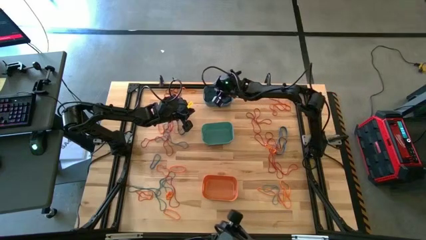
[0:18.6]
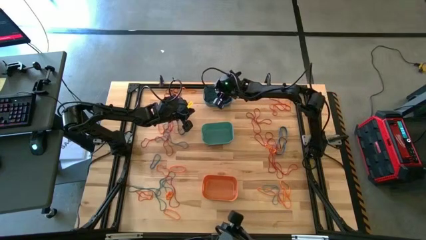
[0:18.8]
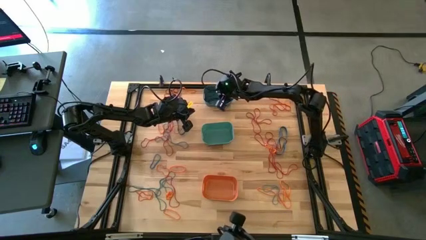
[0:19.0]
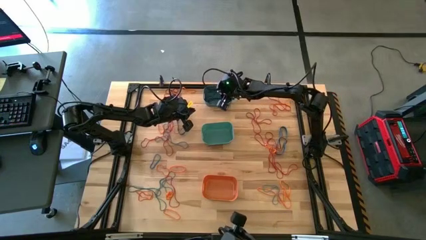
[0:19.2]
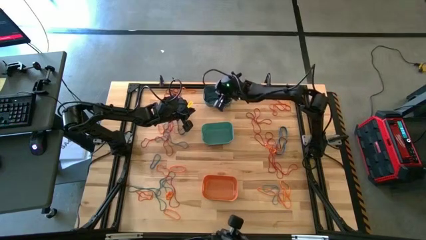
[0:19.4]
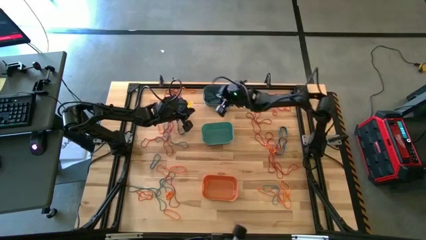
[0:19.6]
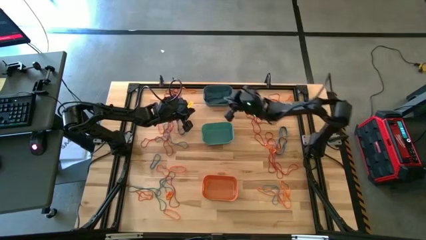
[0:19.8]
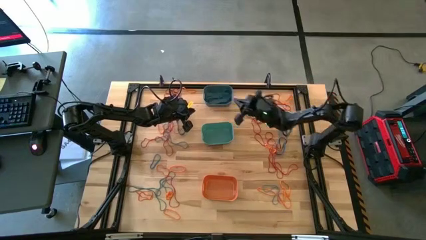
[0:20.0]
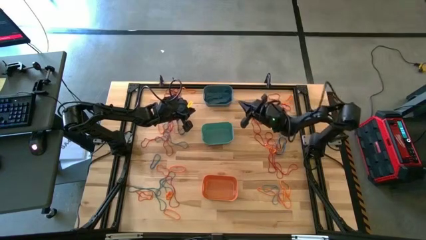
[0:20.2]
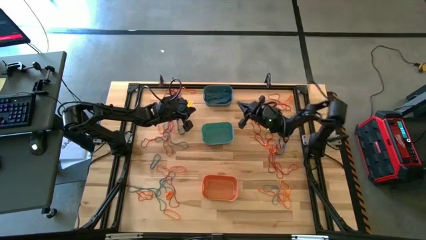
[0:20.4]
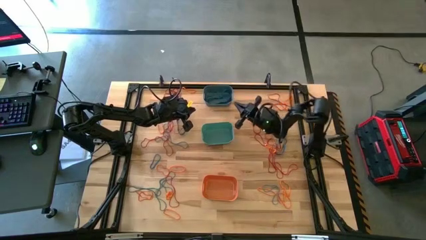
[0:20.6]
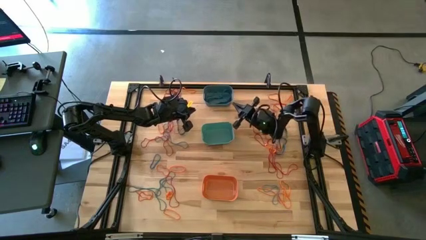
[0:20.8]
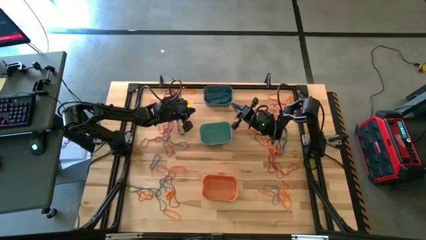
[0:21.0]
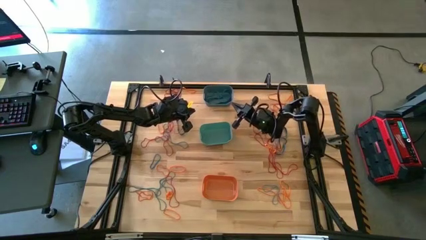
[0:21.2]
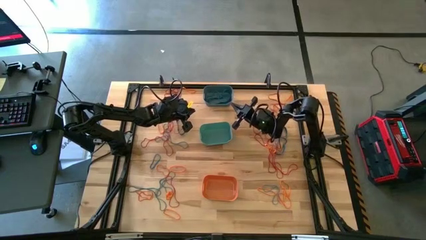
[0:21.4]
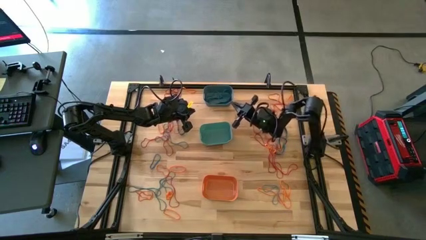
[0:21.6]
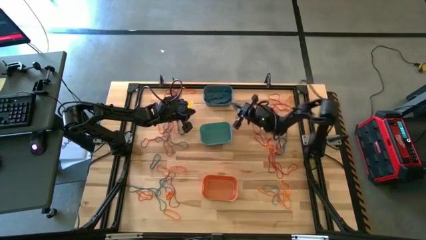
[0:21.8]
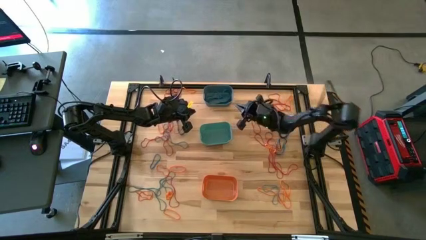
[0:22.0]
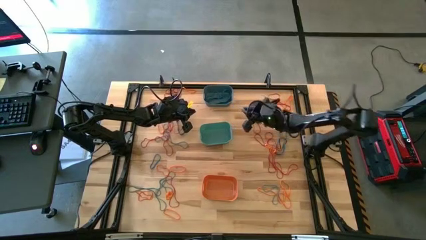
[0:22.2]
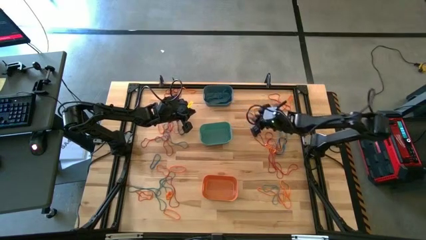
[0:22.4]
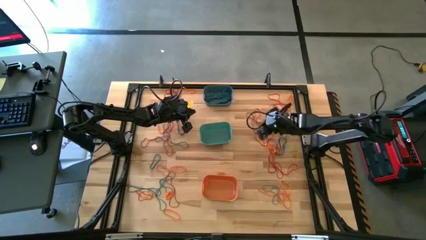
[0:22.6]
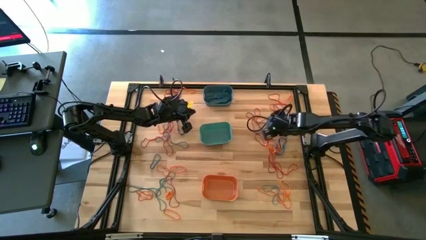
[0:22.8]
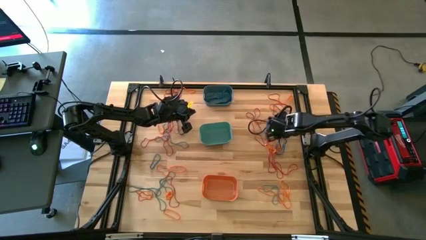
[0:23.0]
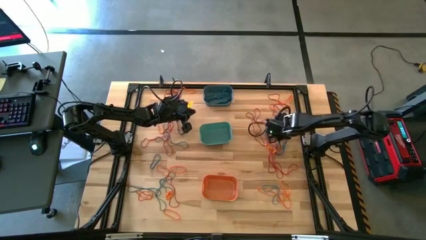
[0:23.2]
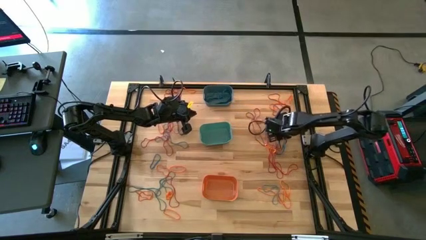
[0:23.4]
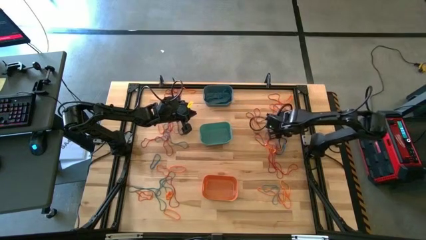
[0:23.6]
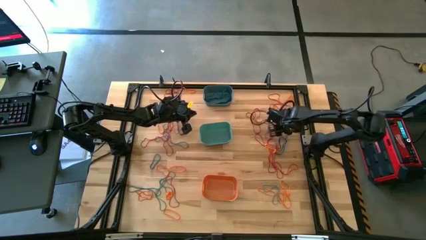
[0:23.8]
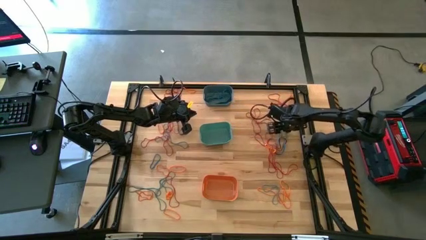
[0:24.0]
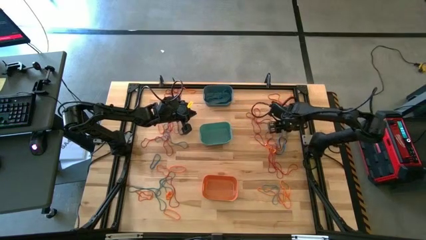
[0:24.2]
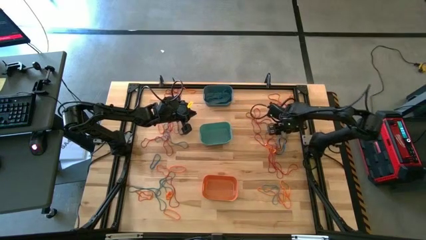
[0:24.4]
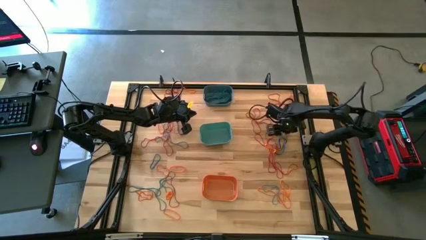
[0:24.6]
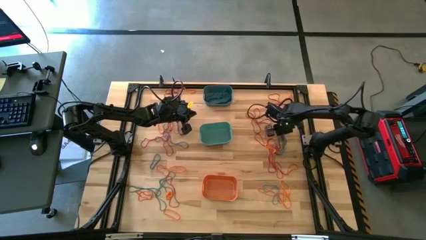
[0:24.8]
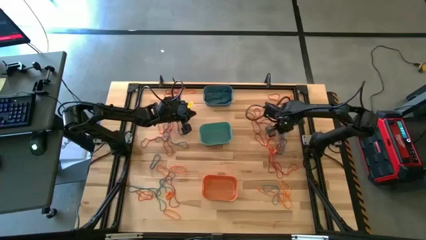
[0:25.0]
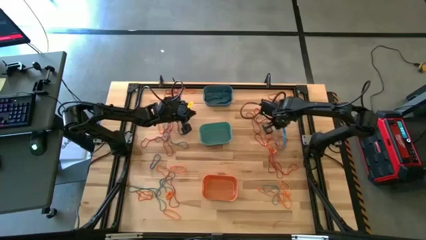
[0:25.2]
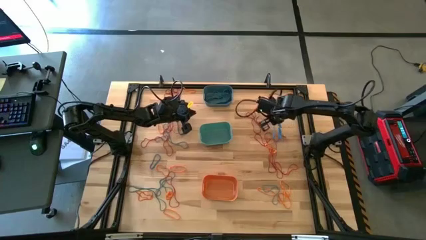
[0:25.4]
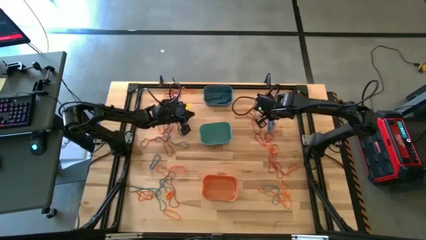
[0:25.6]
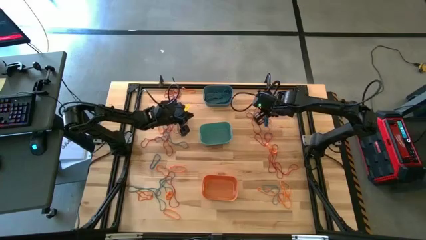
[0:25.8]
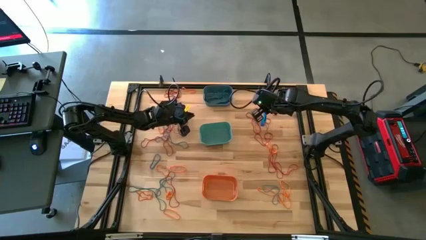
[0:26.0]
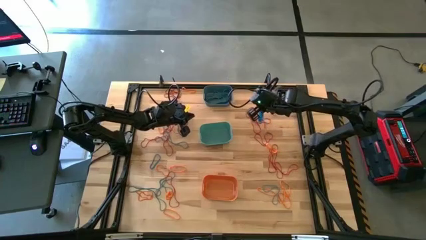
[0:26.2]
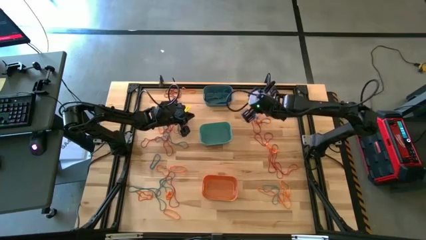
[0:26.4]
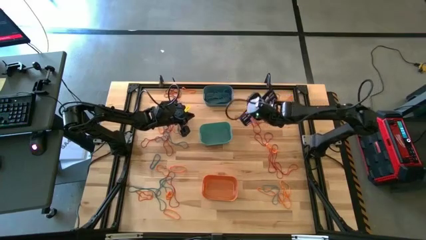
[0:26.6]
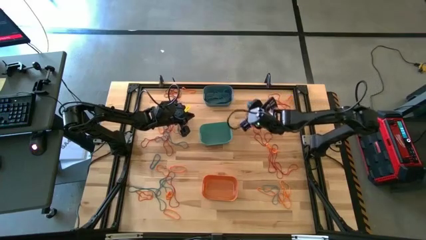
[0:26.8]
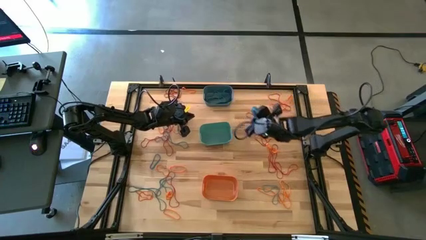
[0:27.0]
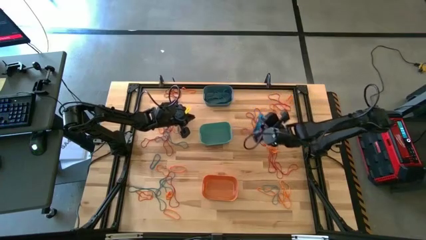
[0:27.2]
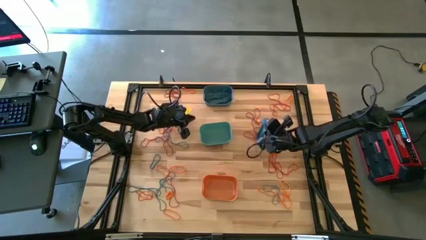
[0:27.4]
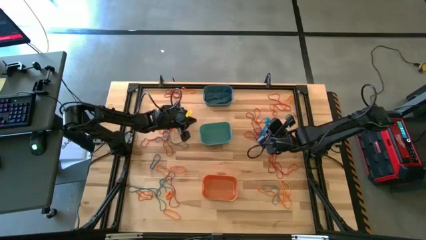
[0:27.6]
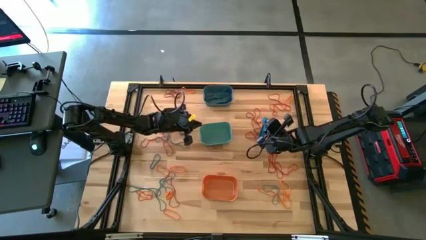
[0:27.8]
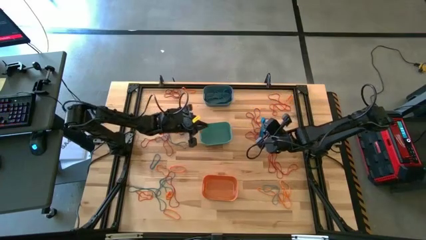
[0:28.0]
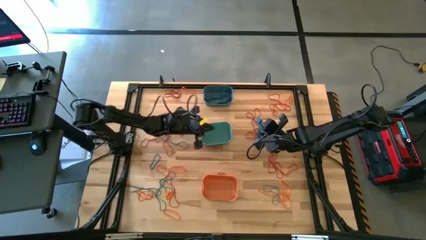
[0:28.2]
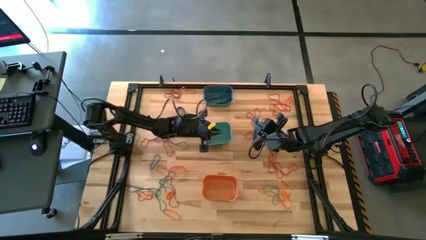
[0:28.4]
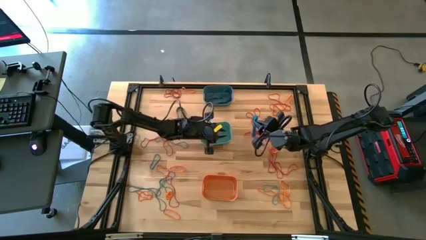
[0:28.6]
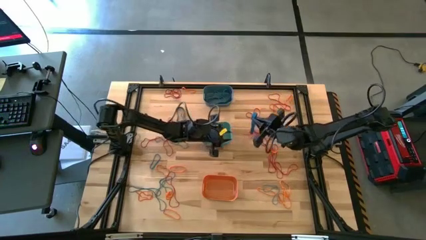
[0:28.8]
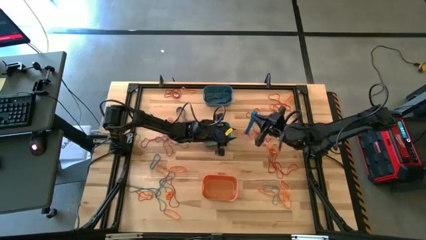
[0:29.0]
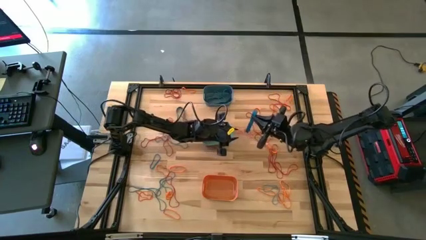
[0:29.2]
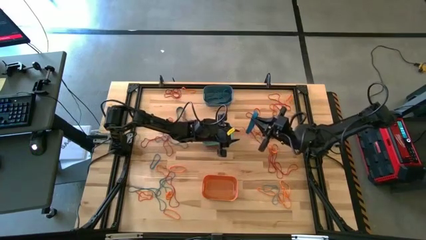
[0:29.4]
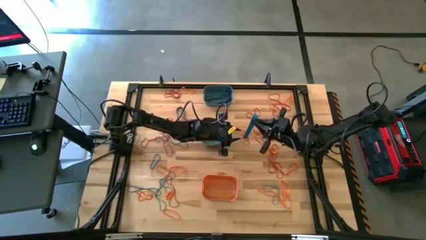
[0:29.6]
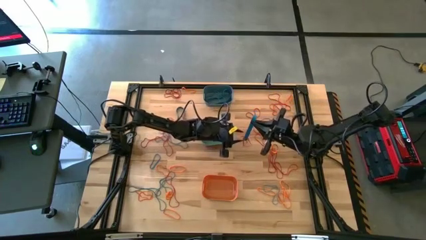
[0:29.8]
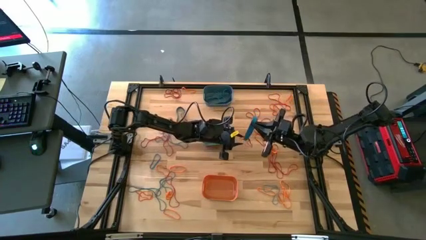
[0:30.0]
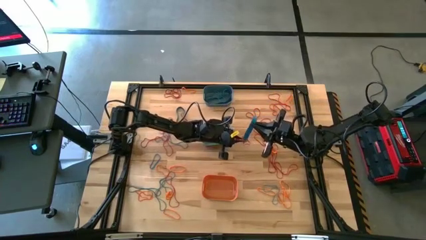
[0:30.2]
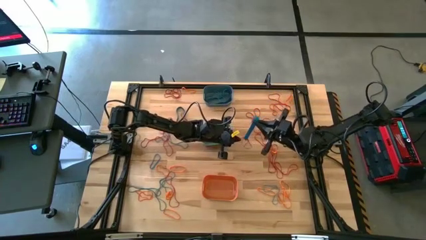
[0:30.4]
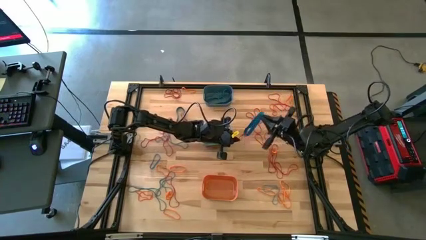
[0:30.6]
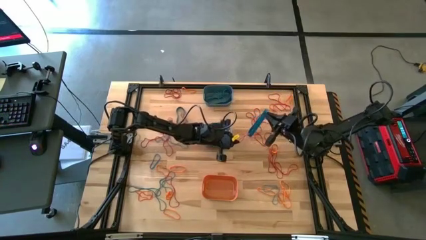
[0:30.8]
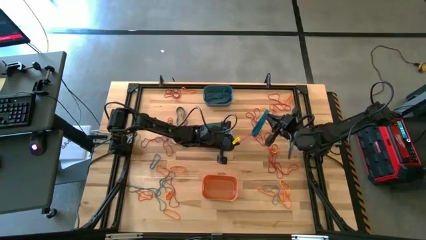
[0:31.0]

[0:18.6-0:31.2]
Task: Sort rubber bands into baskets
Put the blue rubber band into the blue bin
